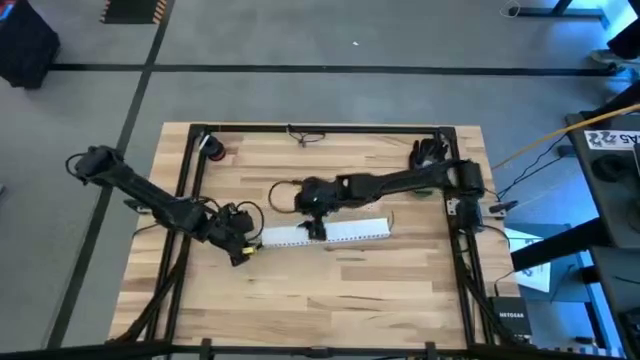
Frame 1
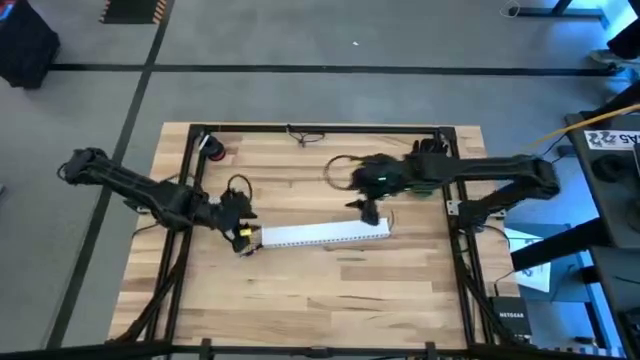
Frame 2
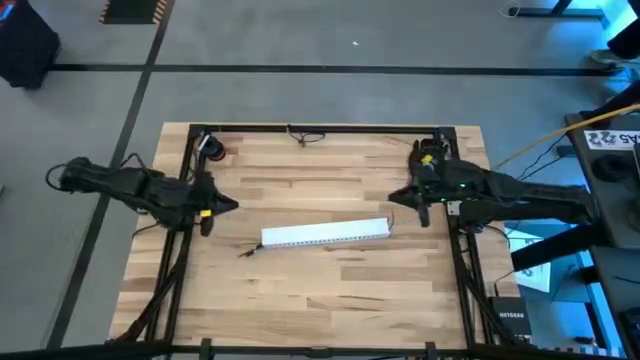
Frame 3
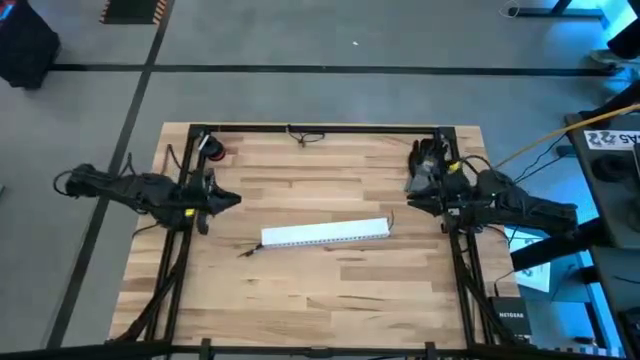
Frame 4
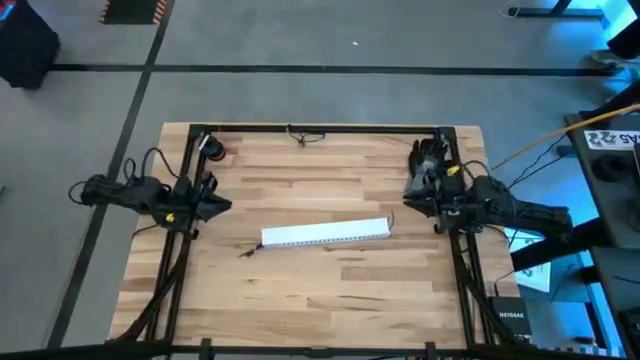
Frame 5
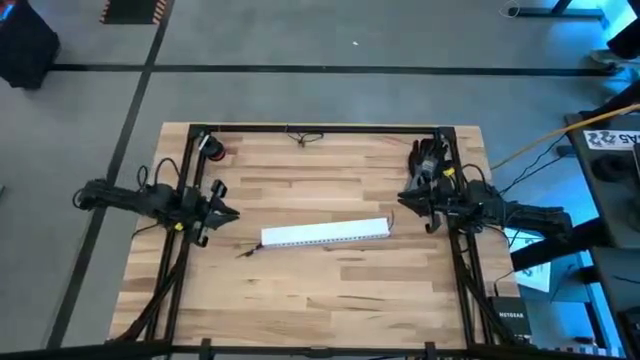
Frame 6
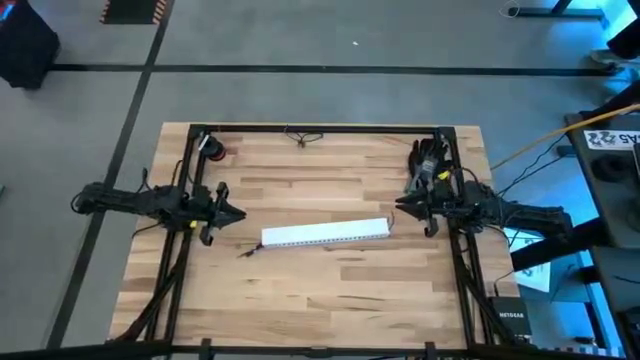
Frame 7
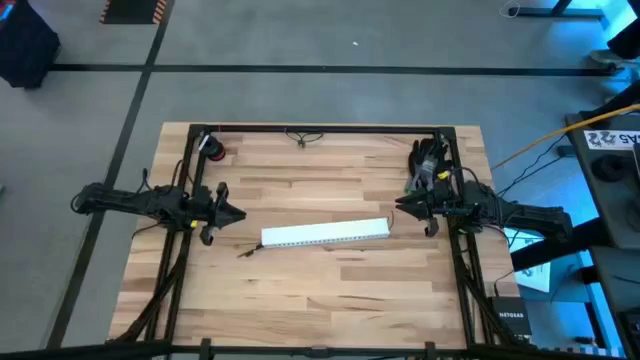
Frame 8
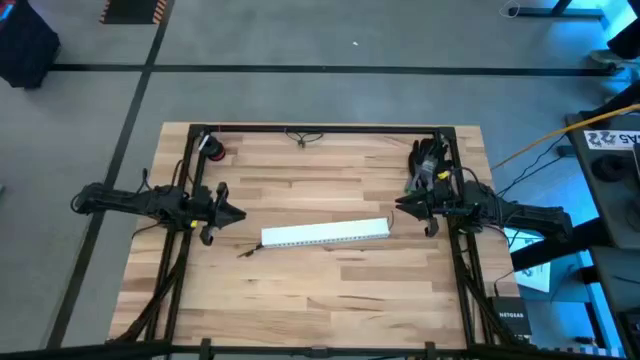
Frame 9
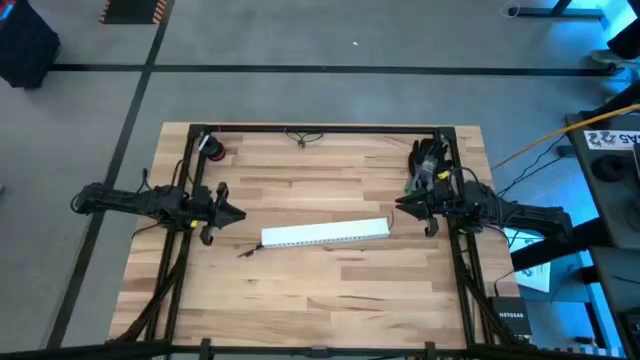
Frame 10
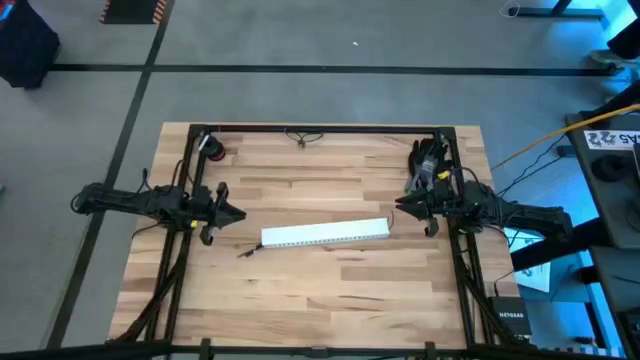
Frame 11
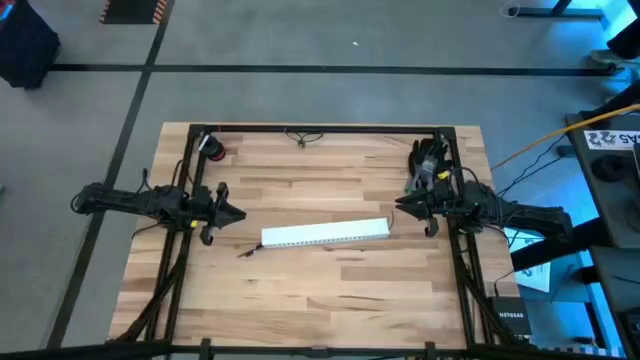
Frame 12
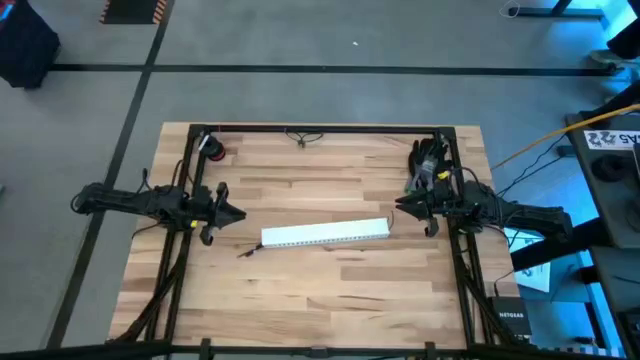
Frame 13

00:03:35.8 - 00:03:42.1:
Task: Ziptie cables
Return to Home Position

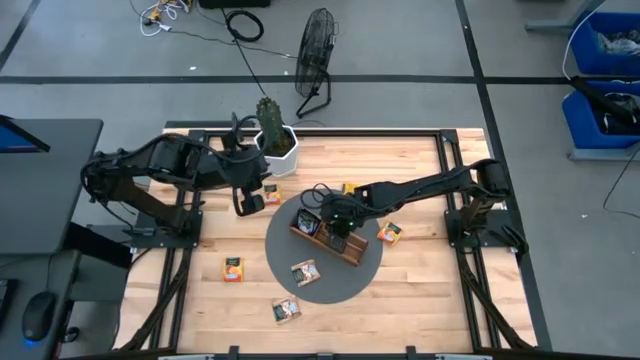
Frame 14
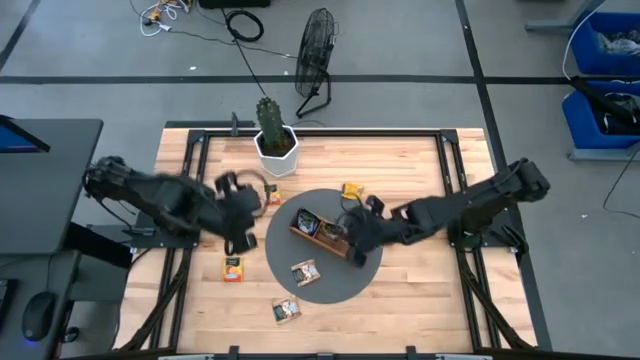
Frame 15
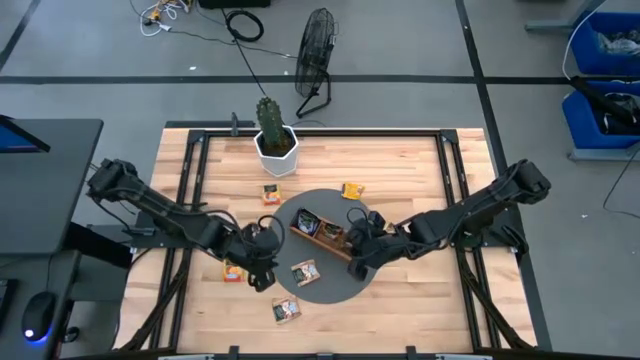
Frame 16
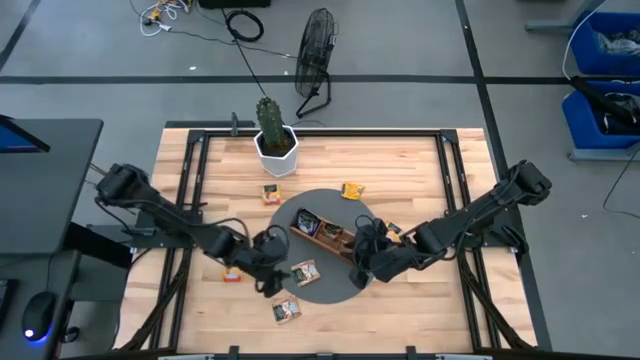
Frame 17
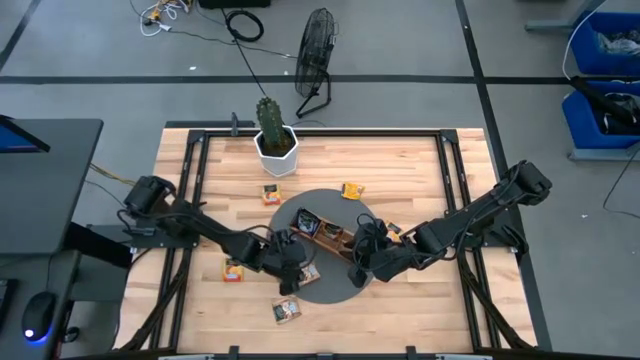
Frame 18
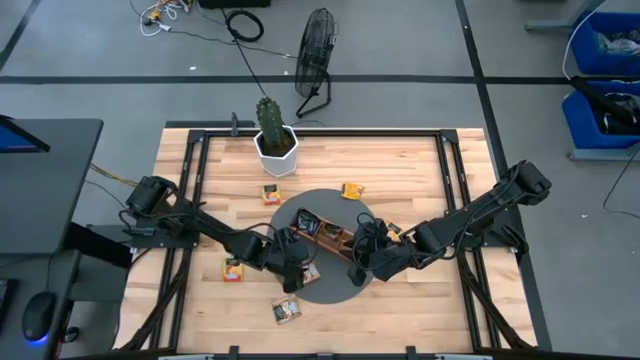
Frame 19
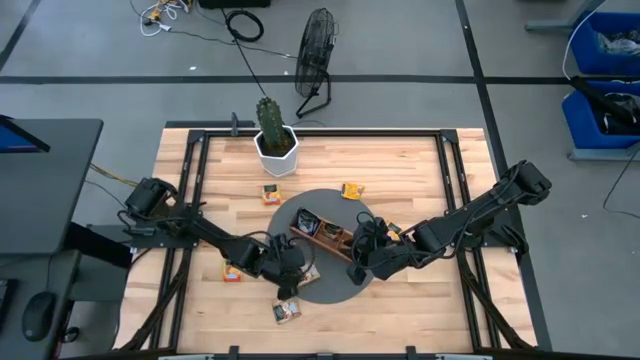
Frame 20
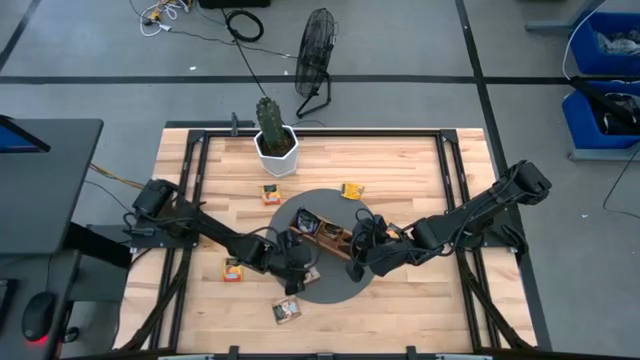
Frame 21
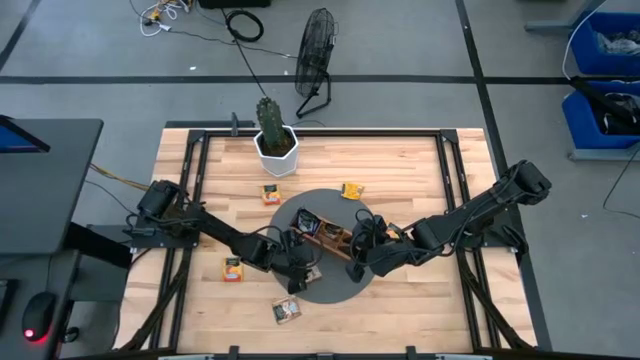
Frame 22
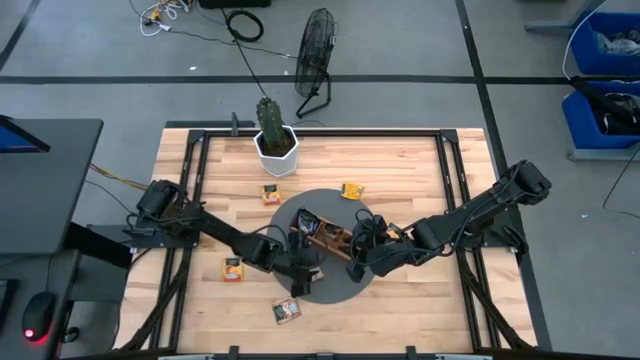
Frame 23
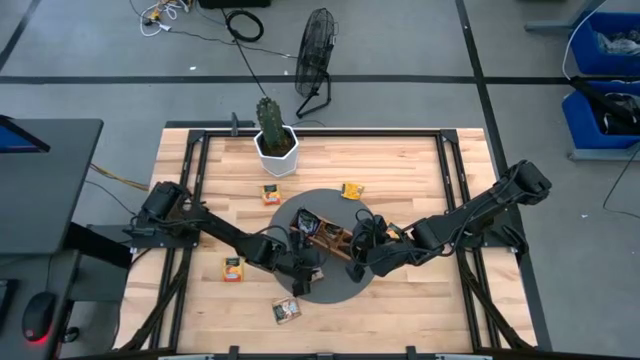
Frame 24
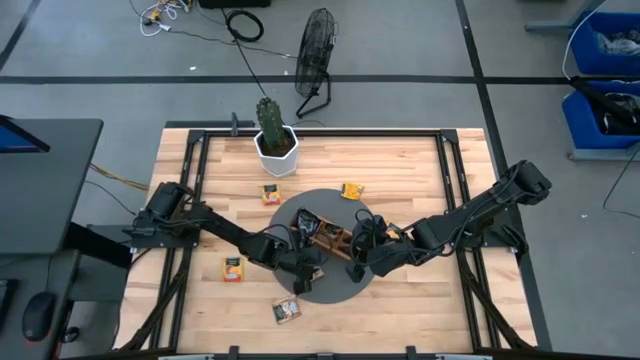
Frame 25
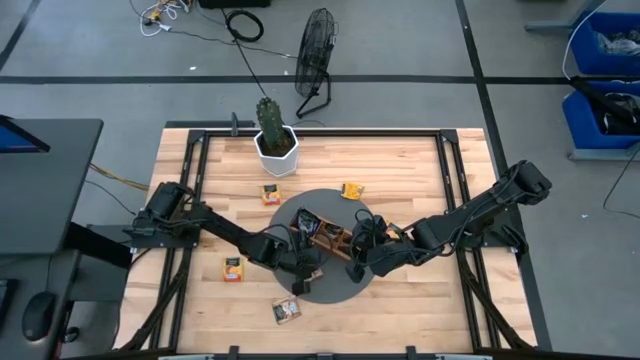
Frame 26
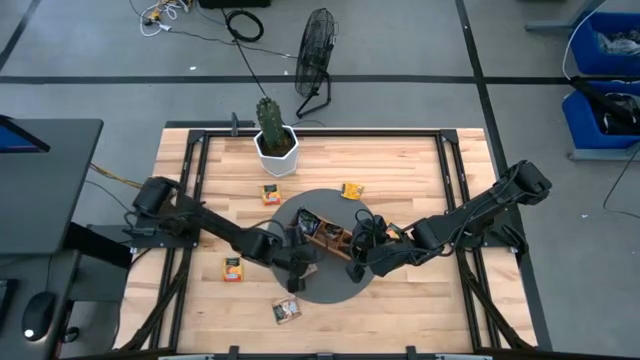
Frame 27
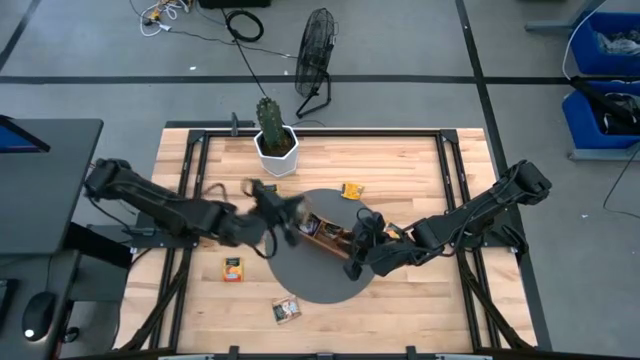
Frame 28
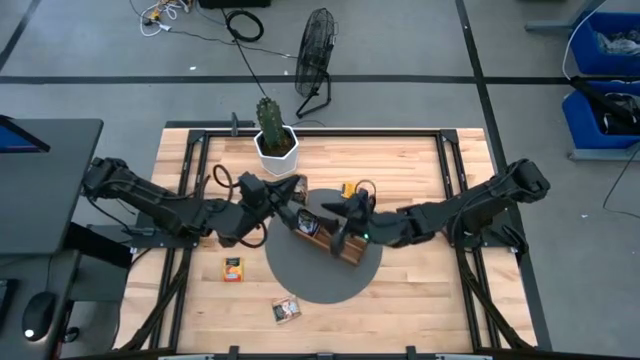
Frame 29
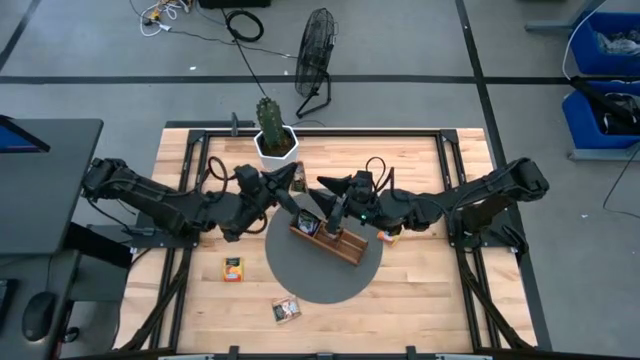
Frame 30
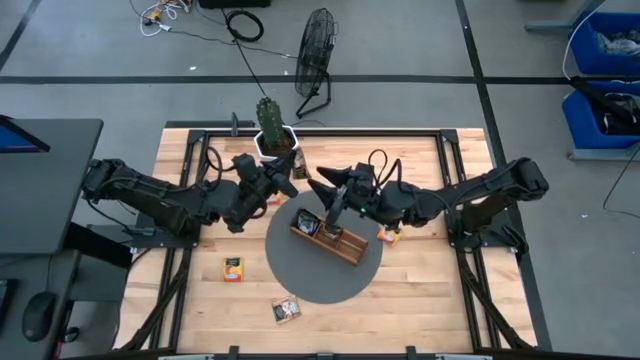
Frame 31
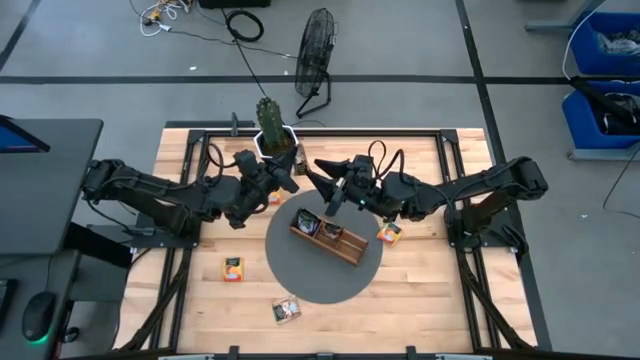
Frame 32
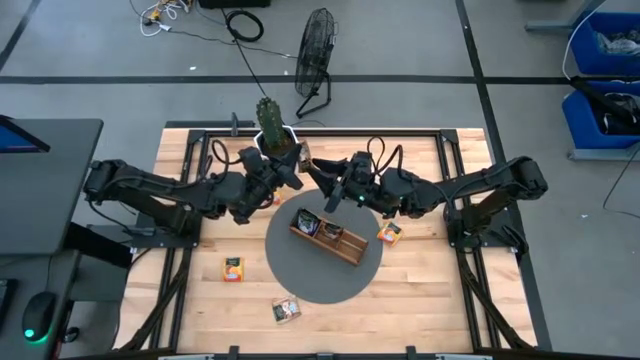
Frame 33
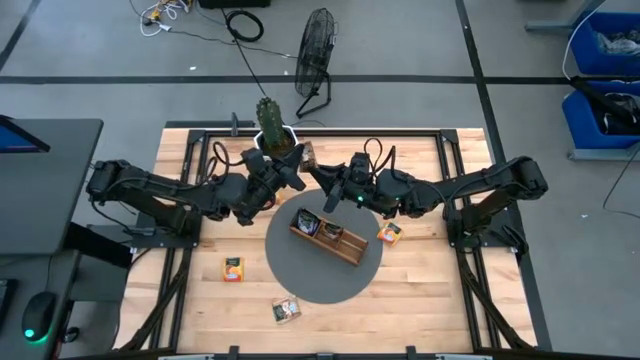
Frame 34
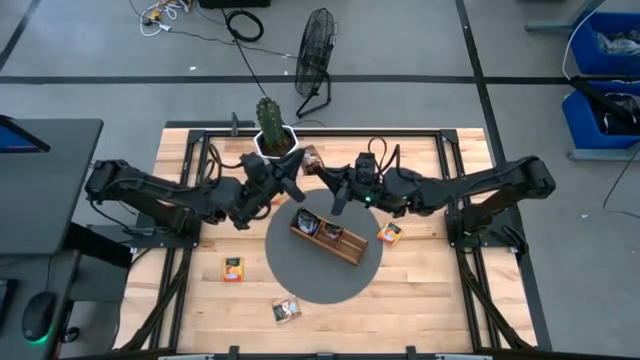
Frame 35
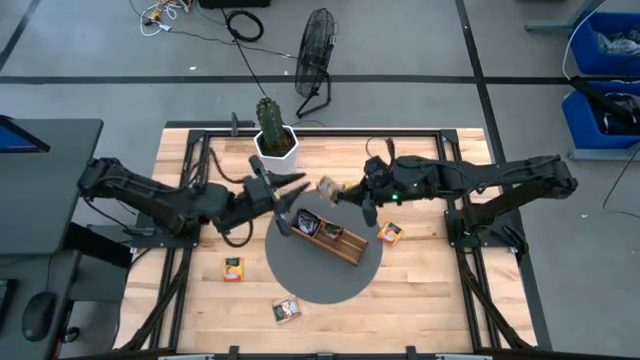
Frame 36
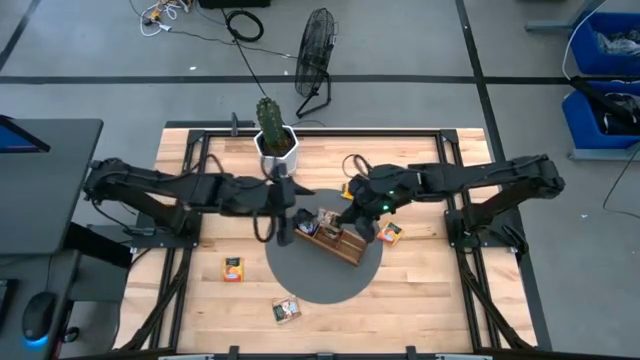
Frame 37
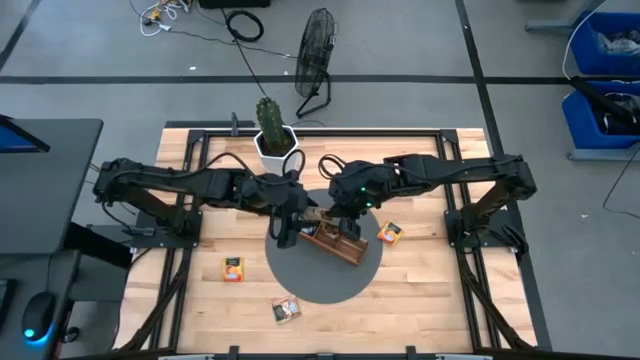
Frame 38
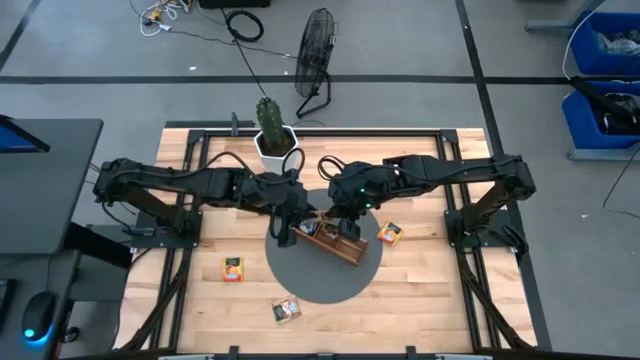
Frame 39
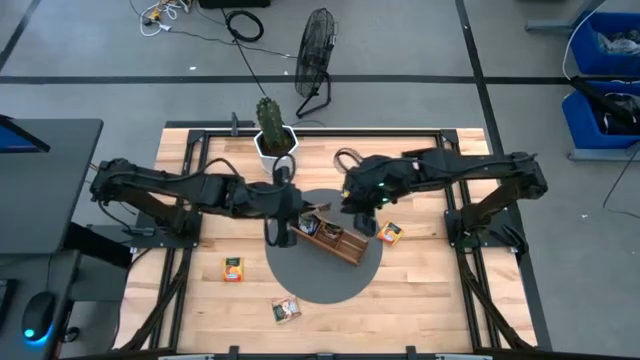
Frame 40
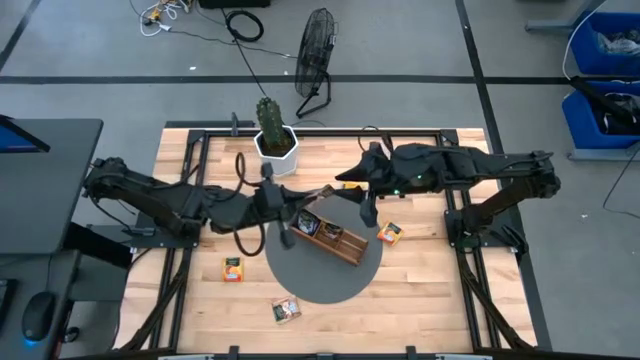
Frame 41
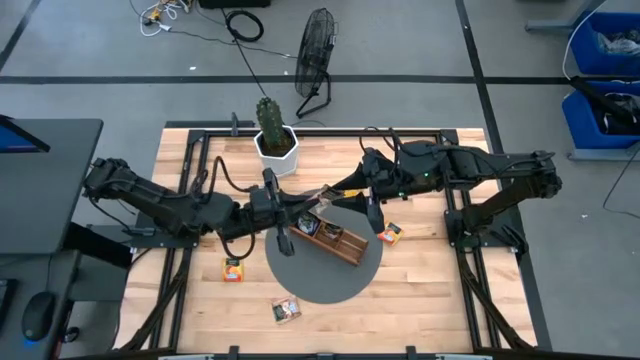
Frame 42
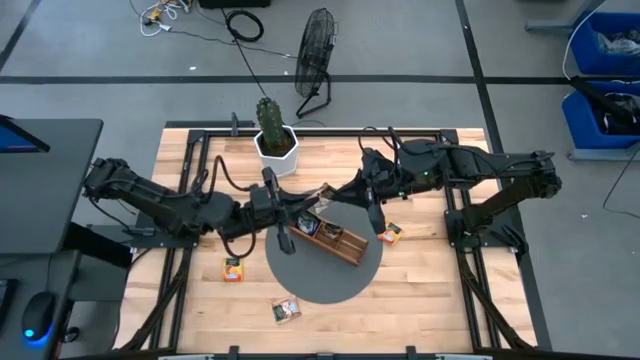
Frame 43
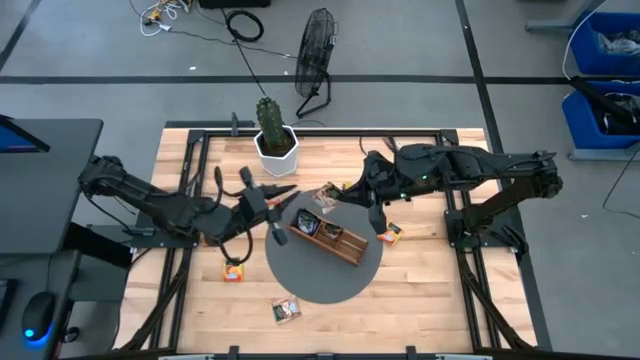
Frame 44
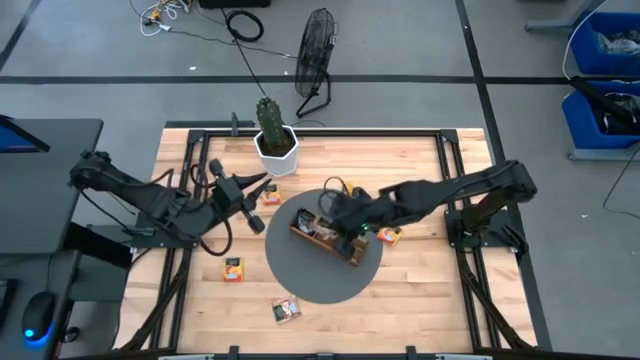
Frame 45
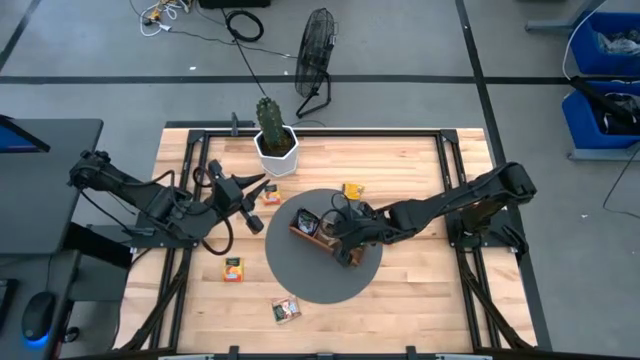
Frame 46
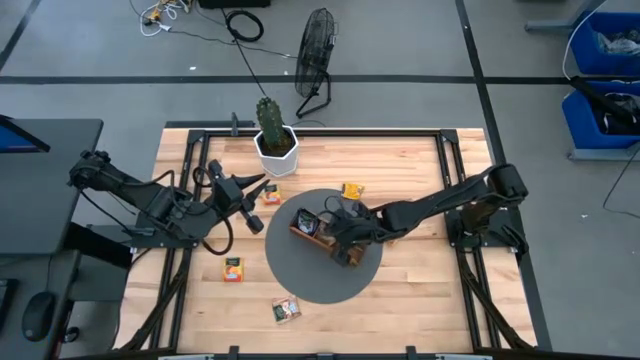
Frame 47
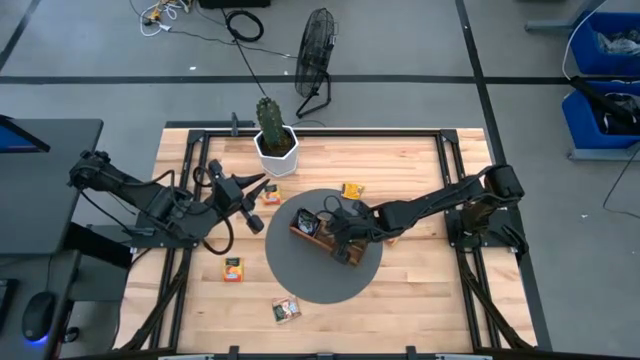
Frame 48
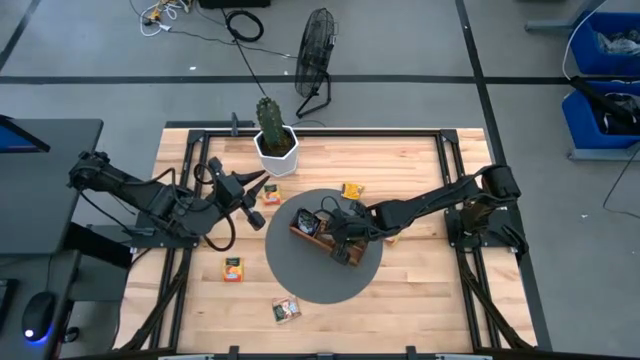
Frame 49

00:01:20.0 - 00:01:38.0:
Task: Pick & Place Tea
Put the brown tea bag into the middle section of the wooden organizer
